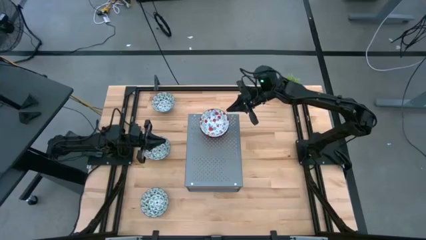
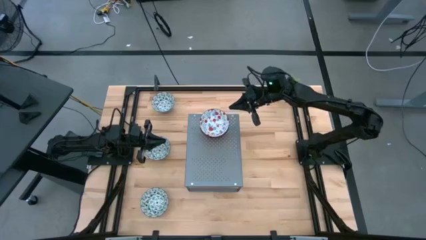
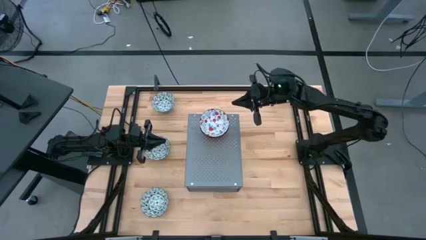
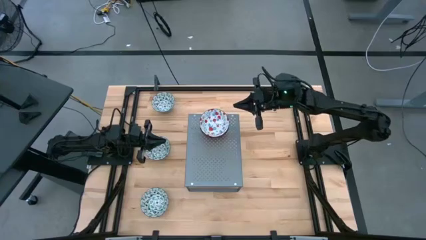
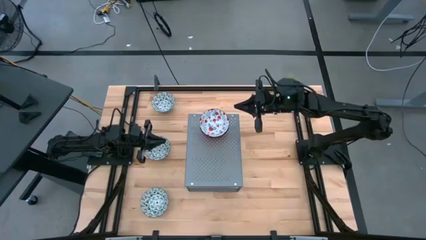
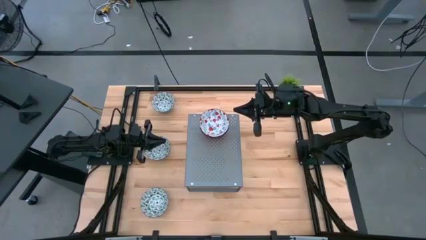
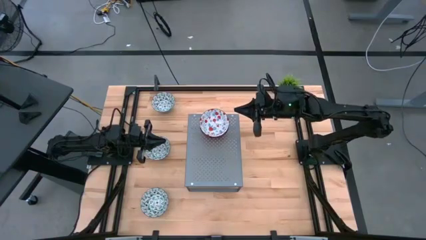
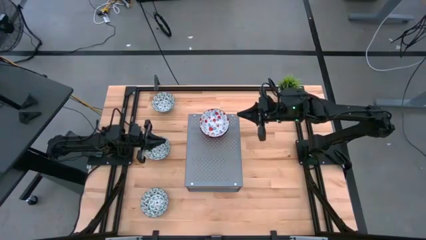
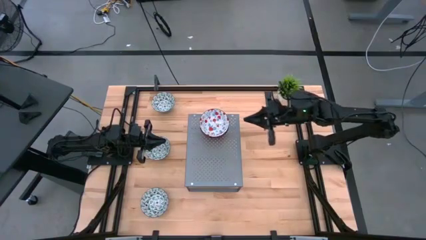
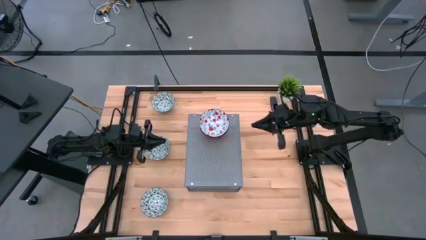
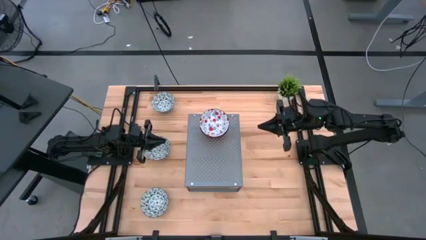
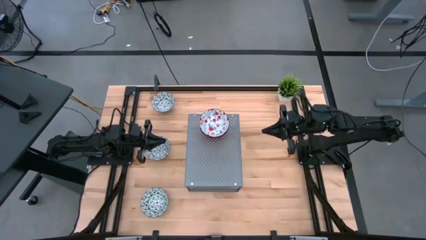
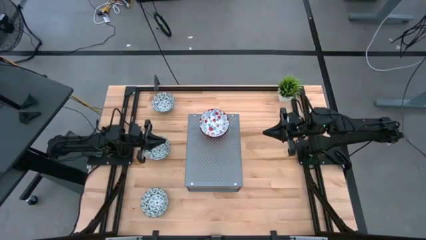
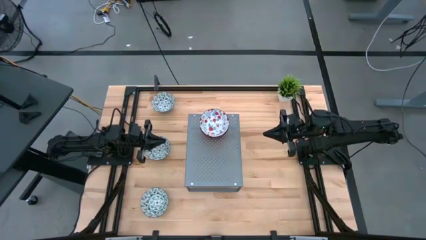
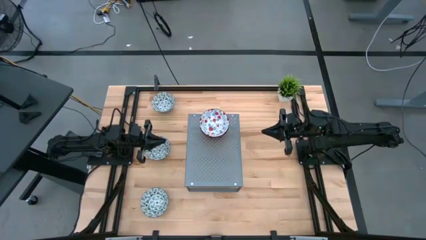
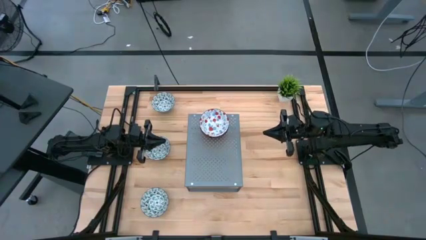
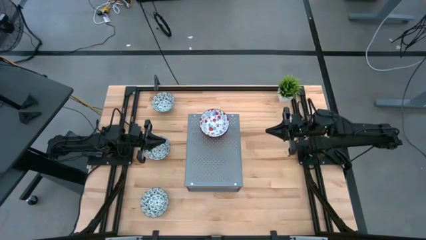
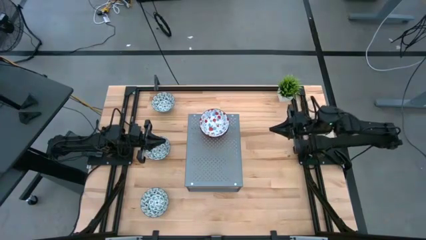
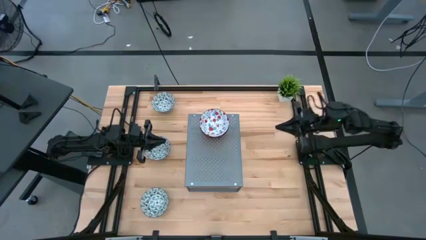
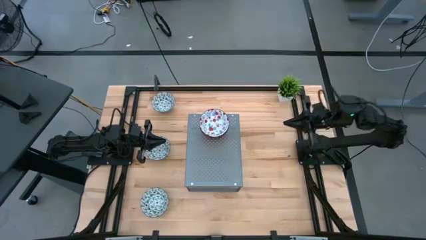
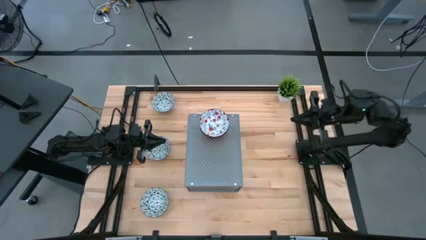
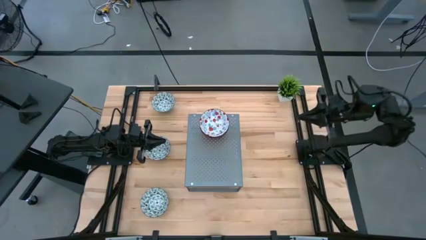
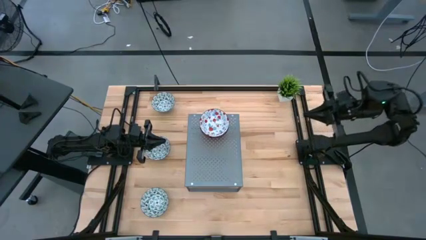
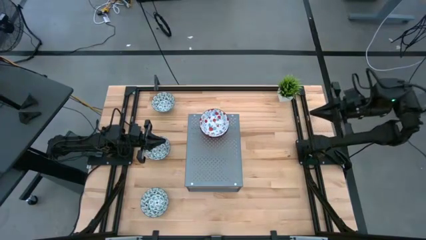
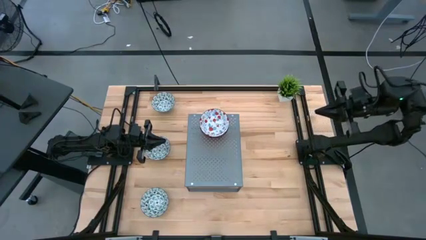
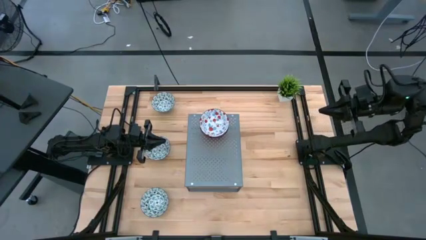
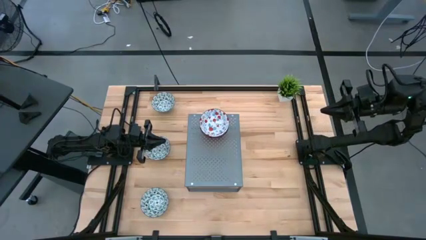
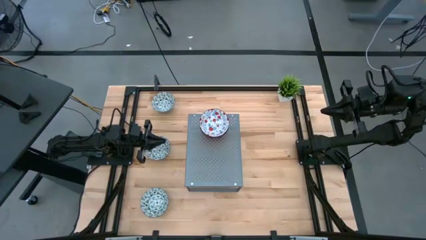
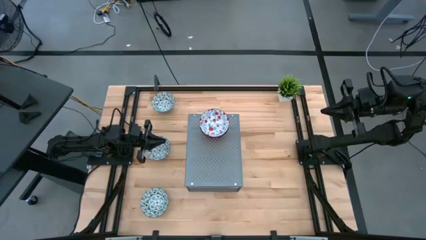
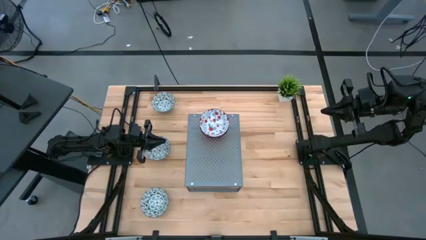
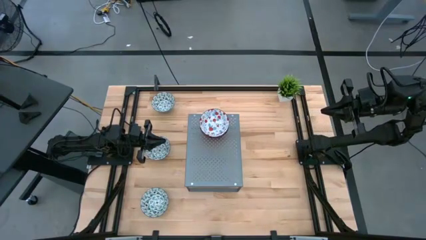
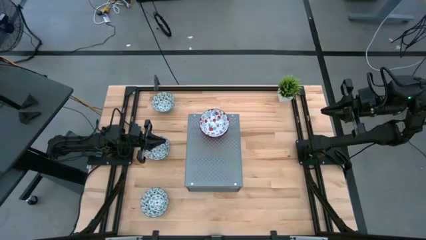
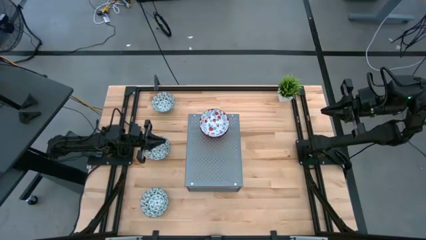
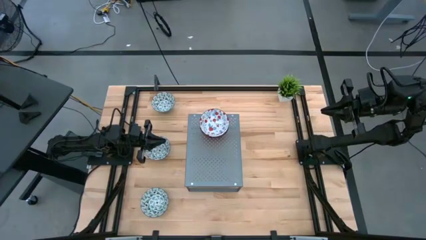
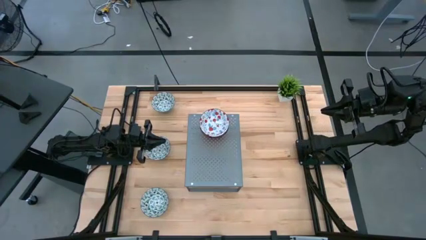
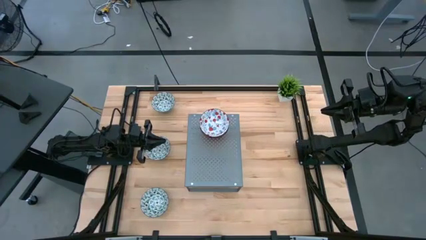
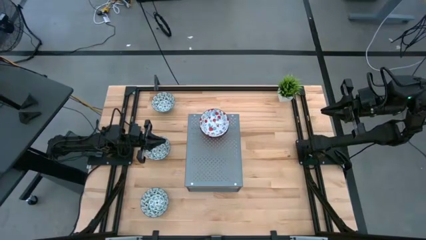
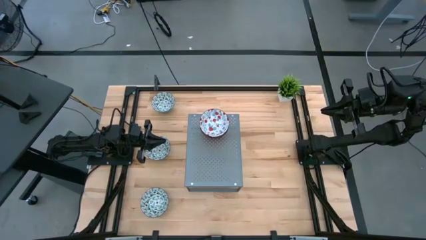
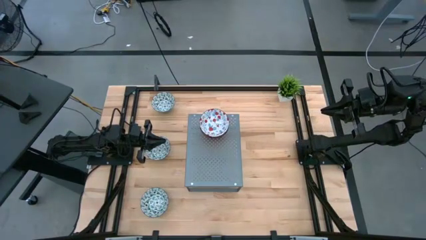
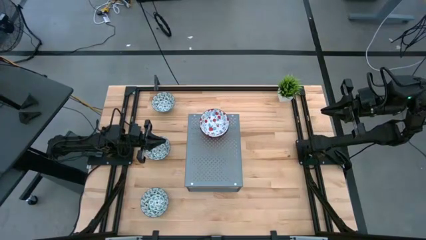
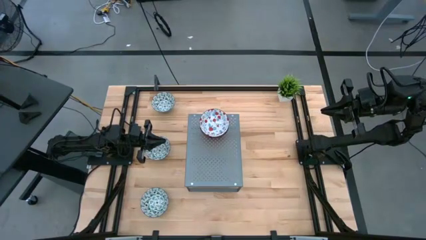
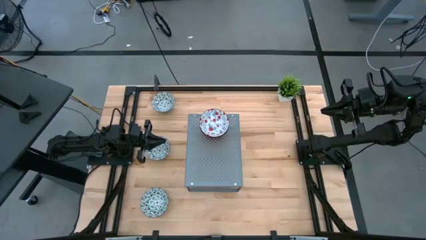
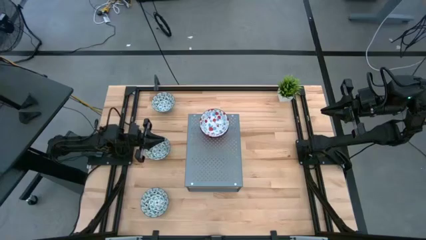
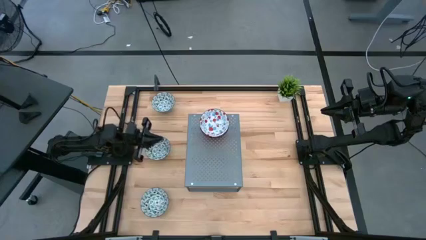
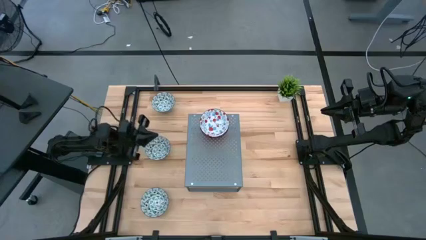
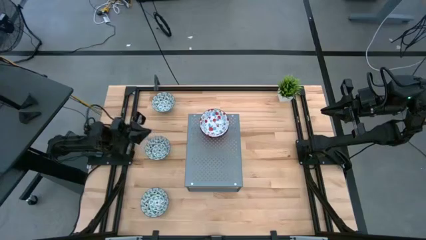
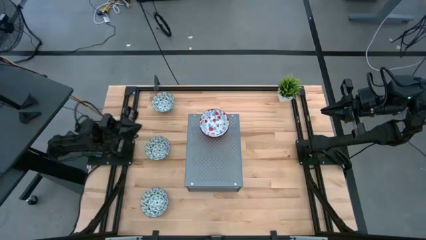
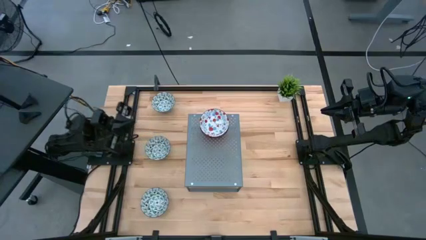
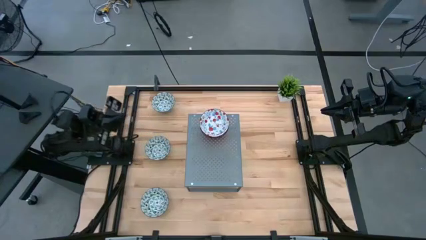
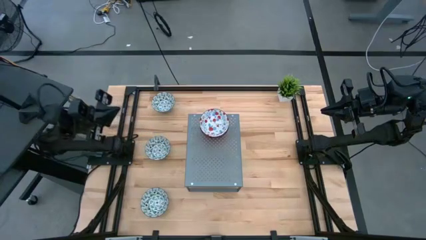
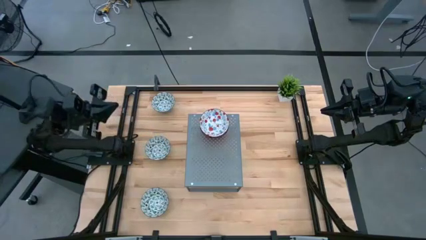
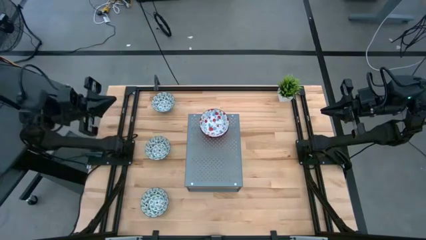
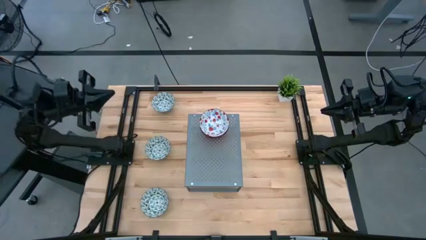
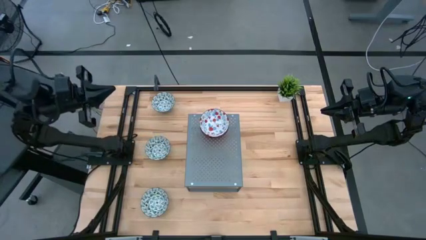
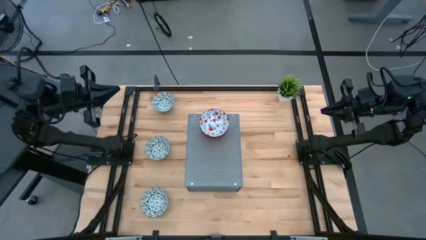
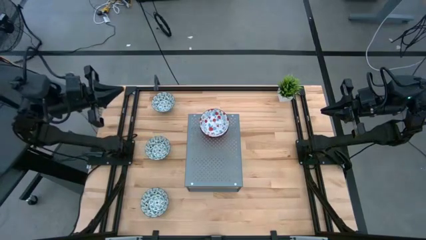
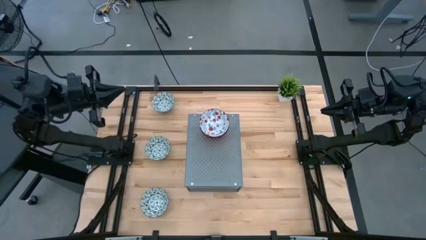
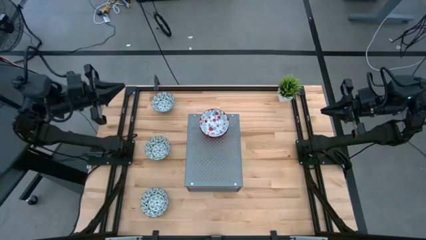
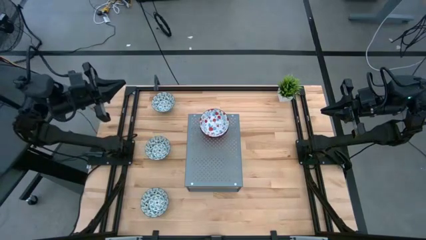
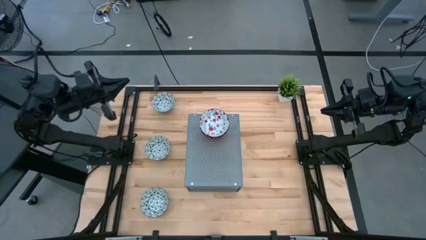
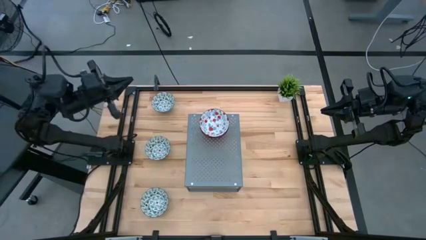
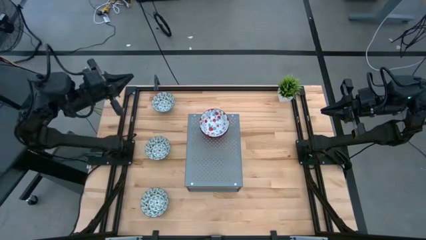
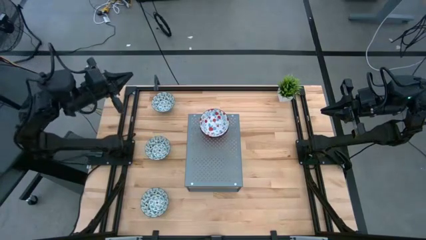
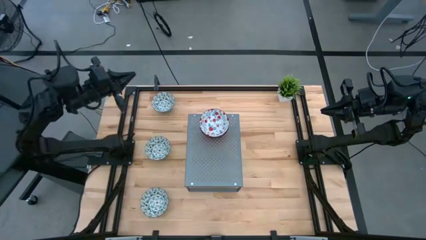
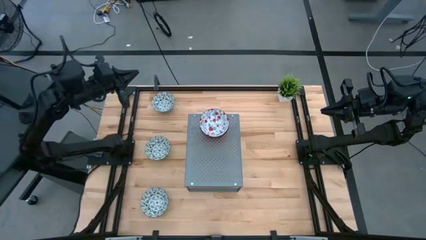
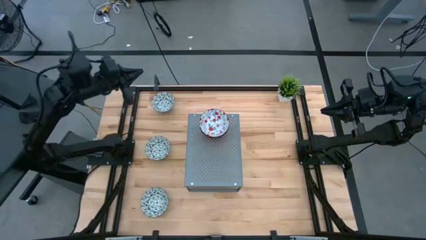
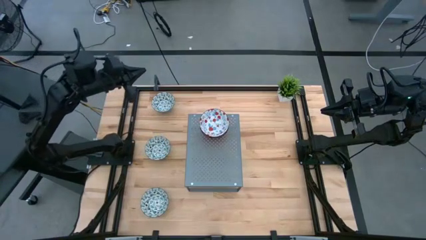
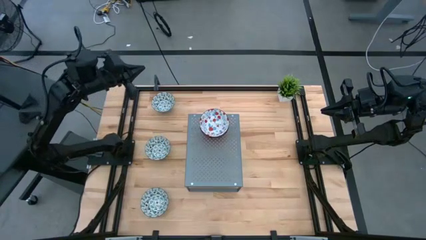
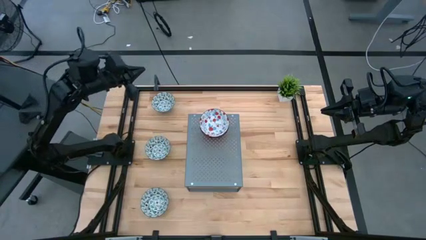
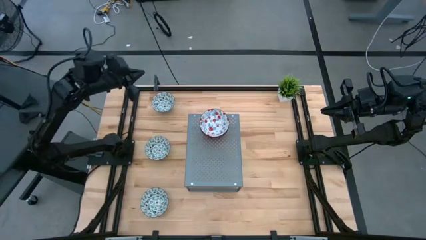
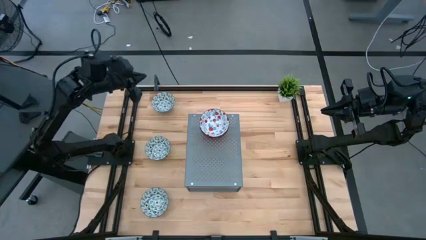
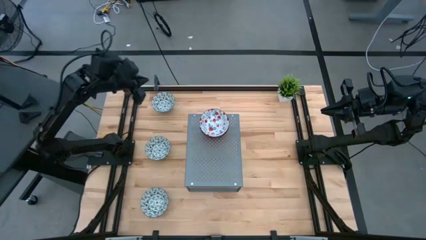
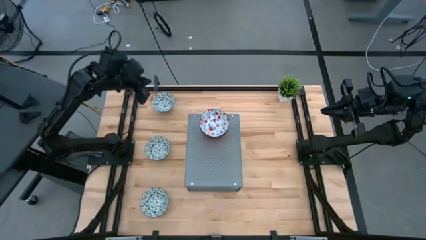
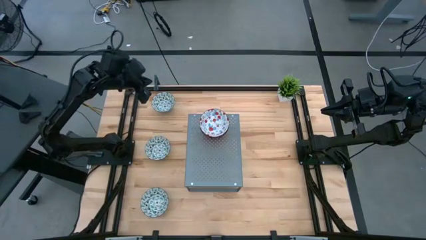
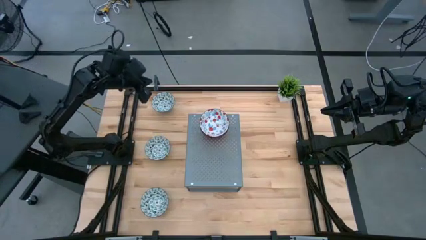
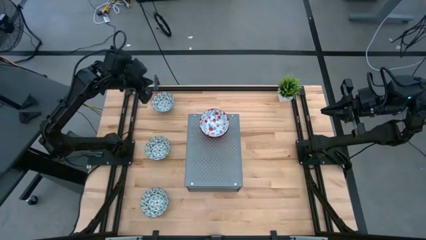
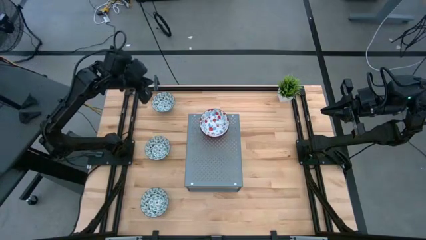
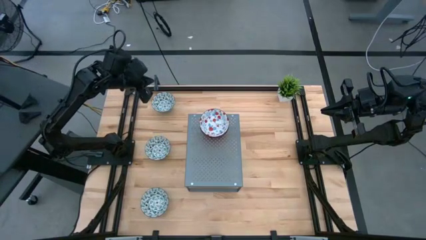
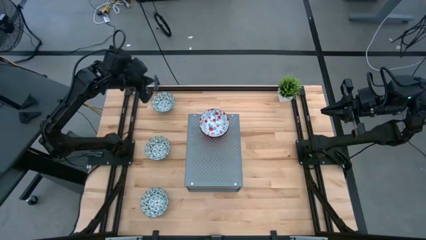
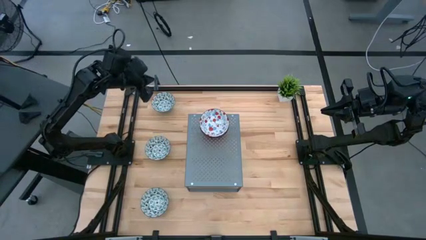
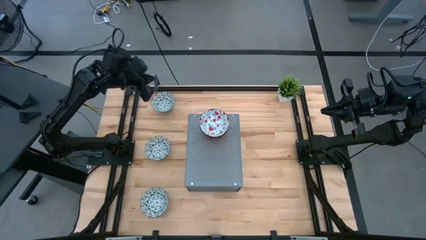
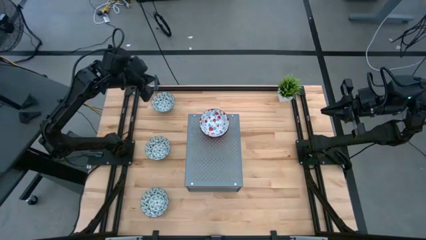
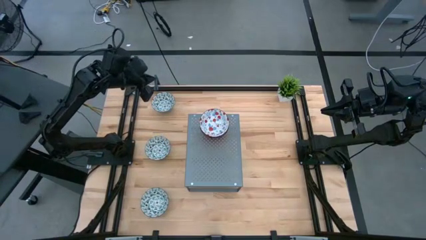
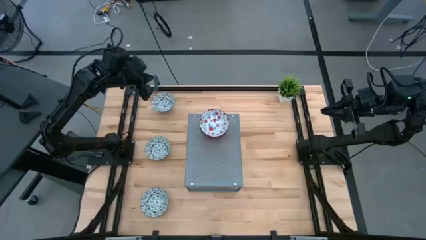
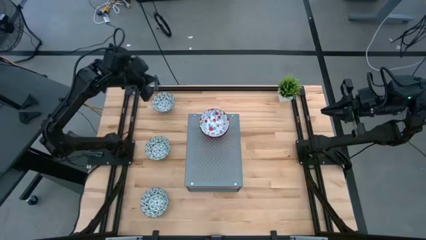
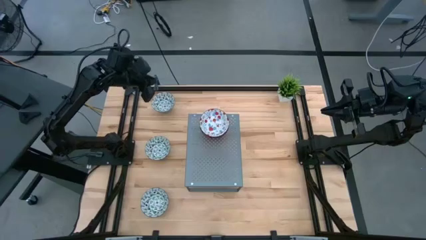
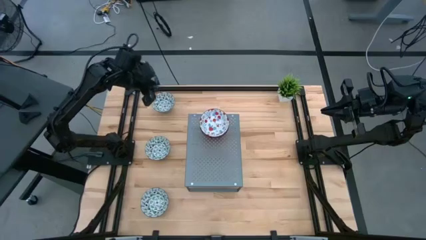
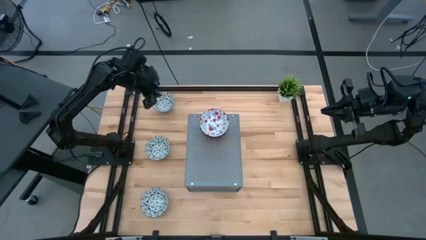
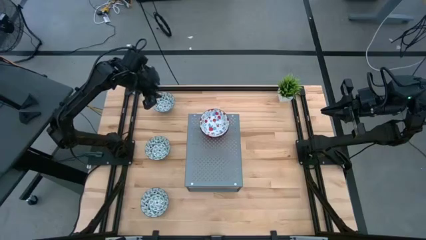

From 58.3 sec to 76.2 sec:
Task: Pick & Place Mini bowls
Put the top green bowl on the shelf
